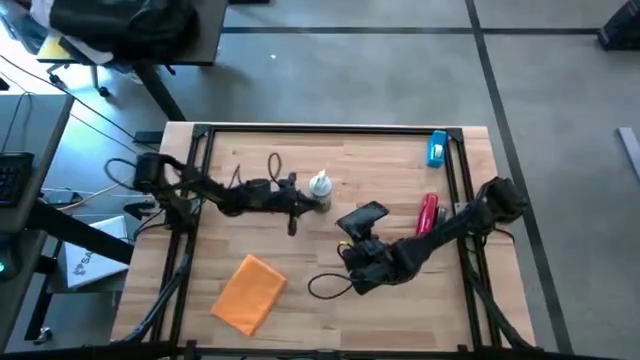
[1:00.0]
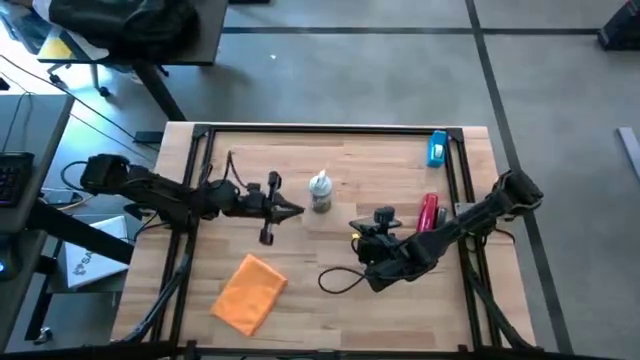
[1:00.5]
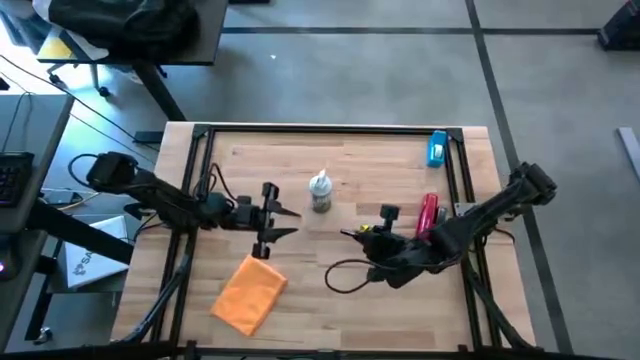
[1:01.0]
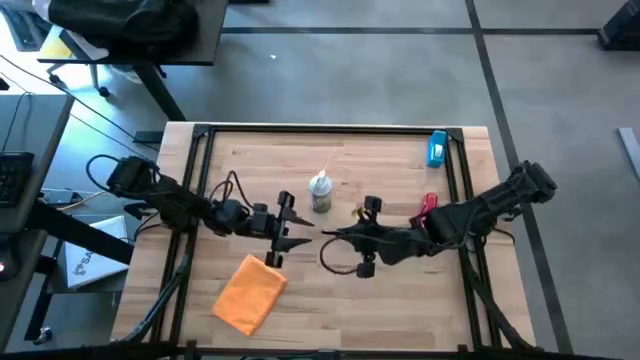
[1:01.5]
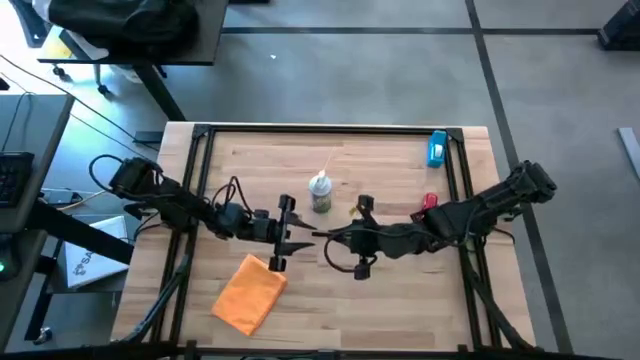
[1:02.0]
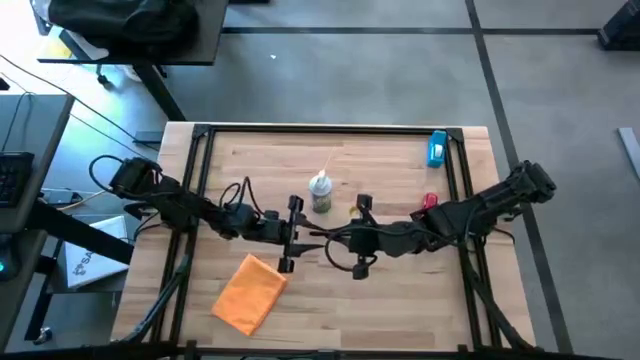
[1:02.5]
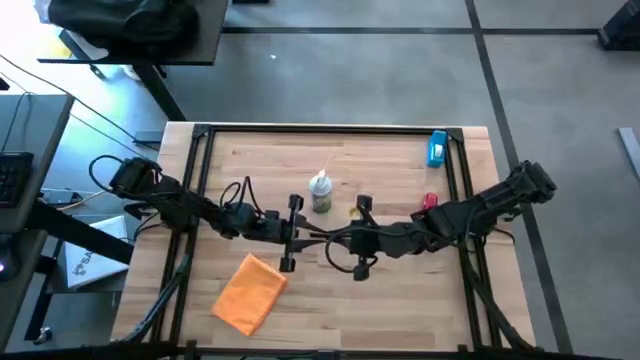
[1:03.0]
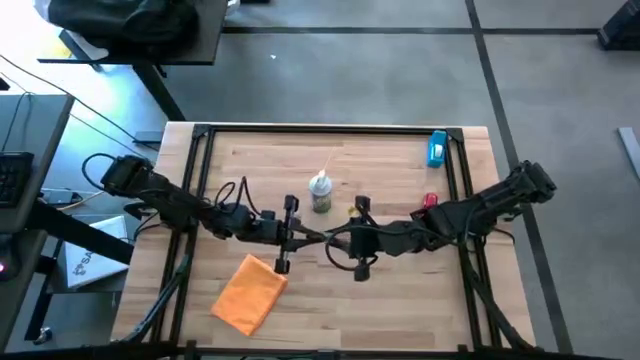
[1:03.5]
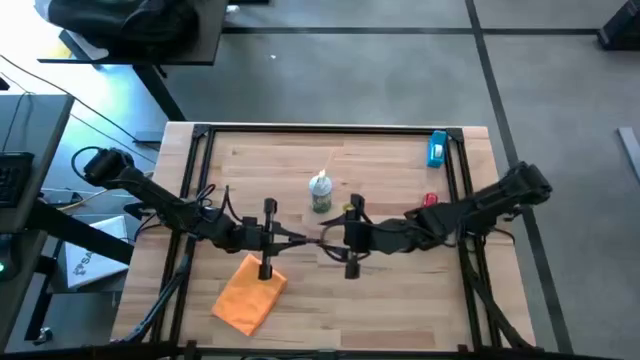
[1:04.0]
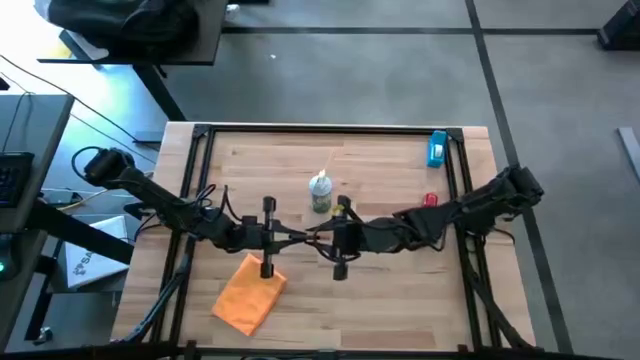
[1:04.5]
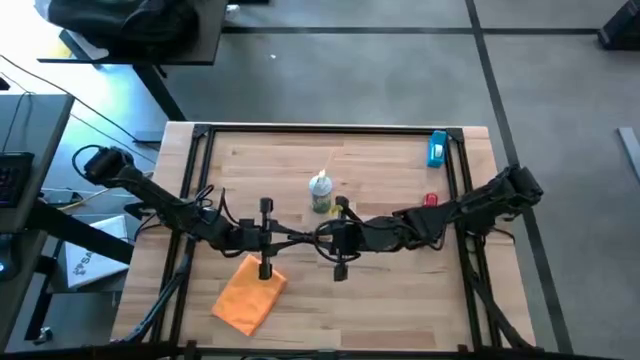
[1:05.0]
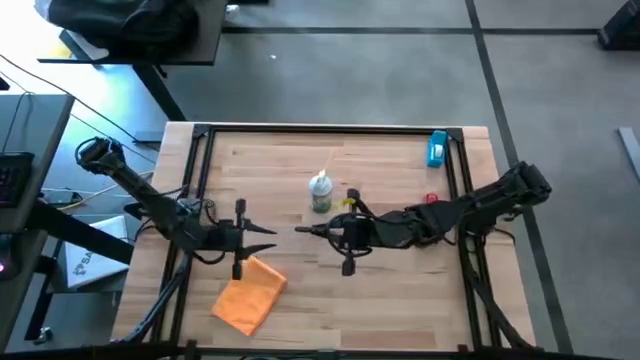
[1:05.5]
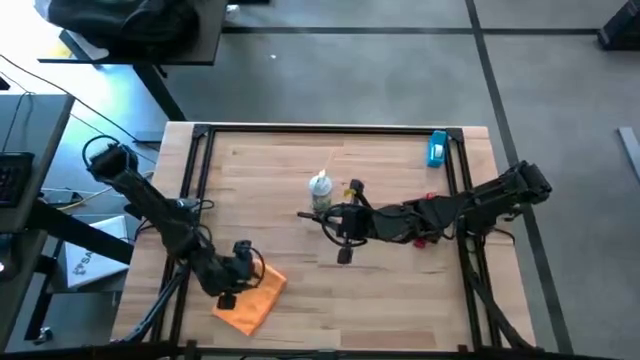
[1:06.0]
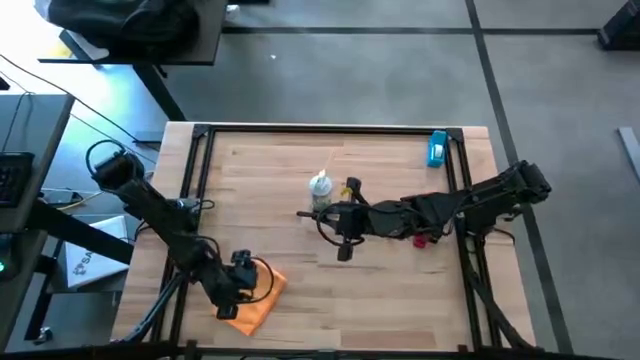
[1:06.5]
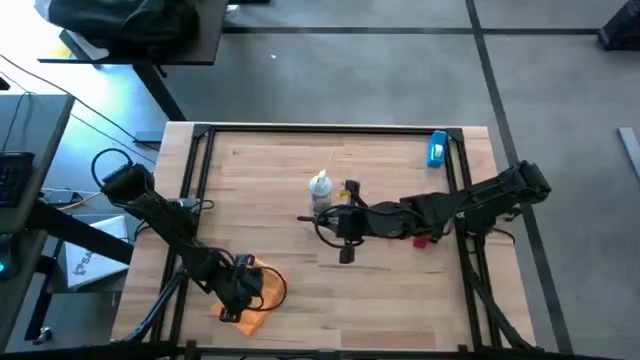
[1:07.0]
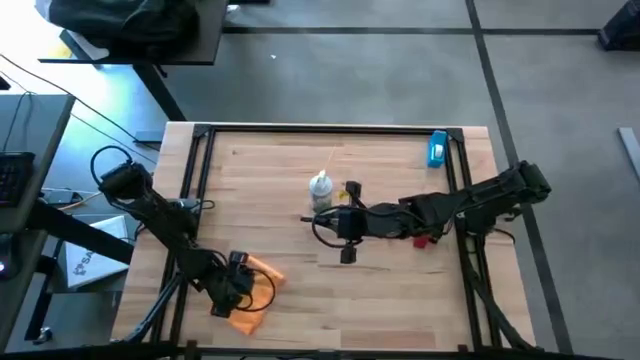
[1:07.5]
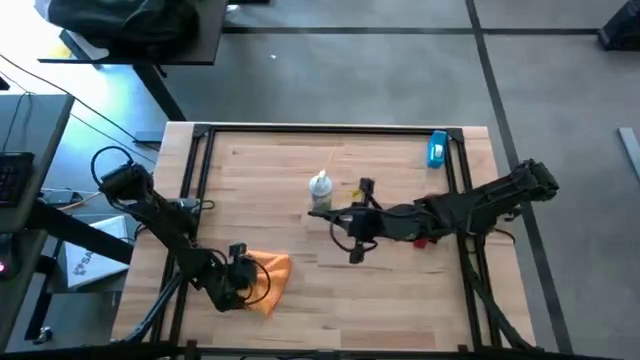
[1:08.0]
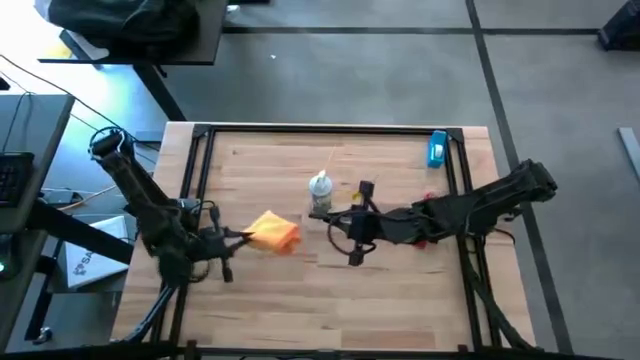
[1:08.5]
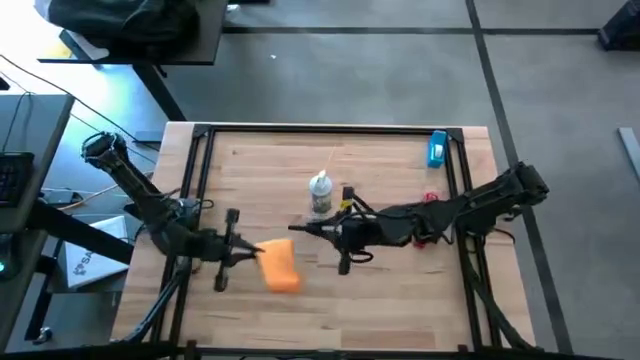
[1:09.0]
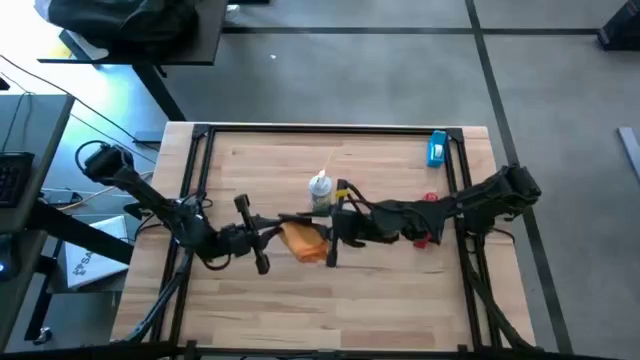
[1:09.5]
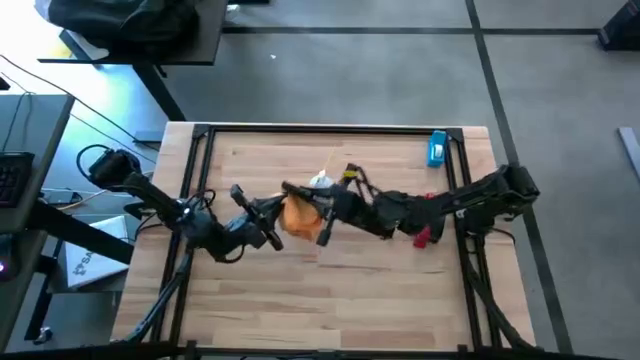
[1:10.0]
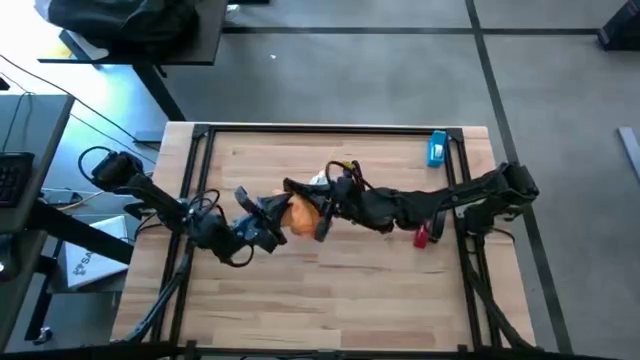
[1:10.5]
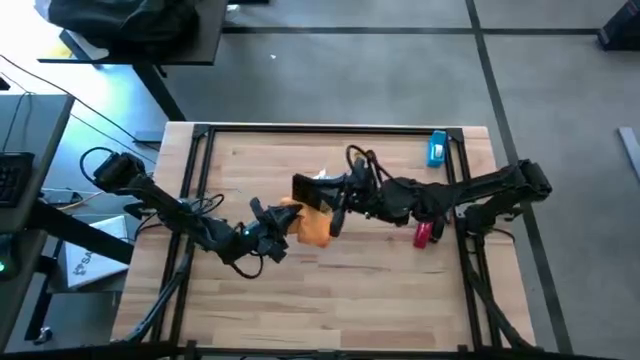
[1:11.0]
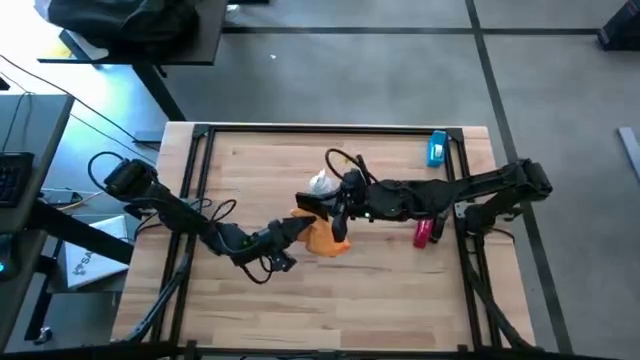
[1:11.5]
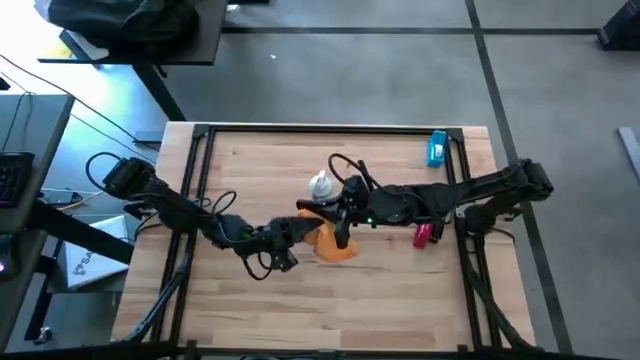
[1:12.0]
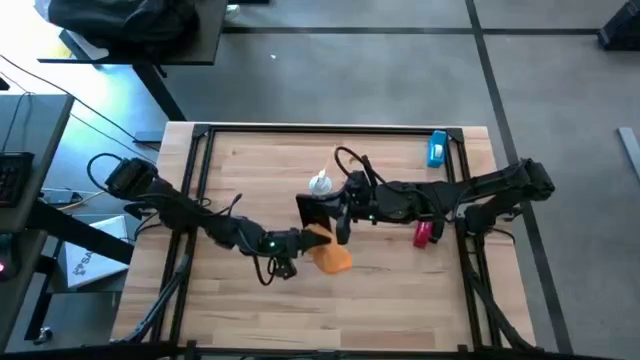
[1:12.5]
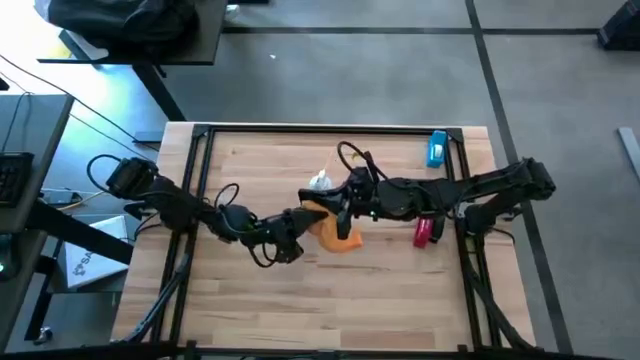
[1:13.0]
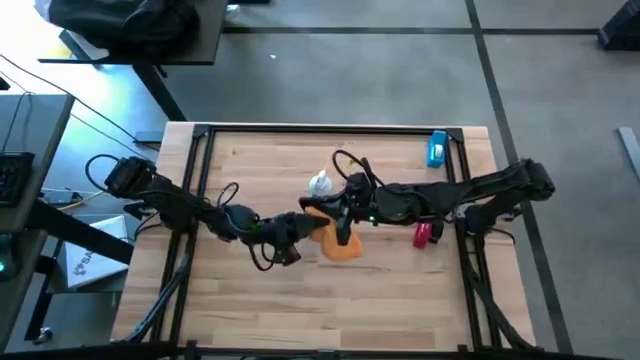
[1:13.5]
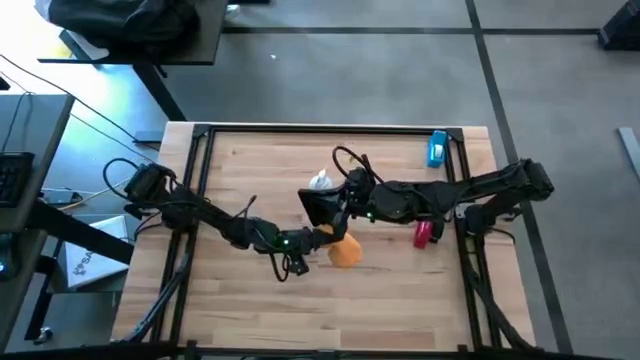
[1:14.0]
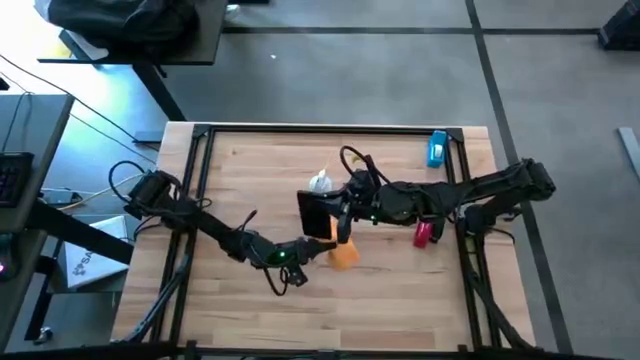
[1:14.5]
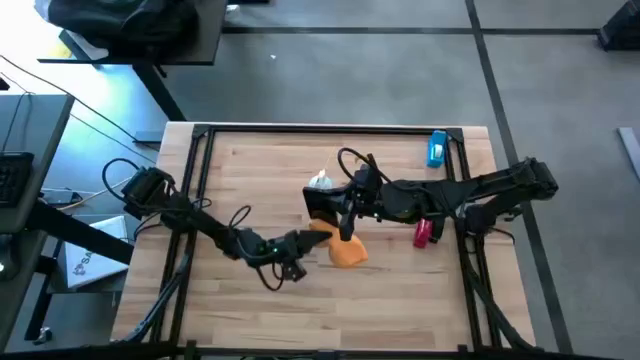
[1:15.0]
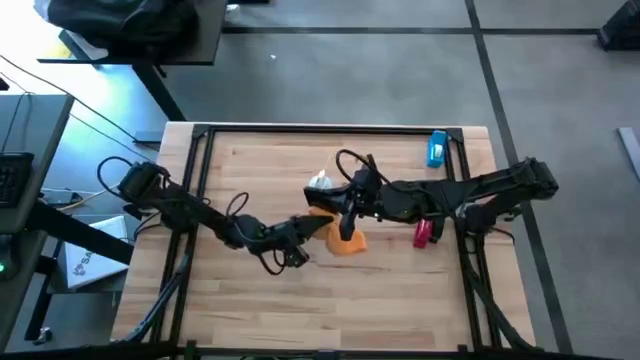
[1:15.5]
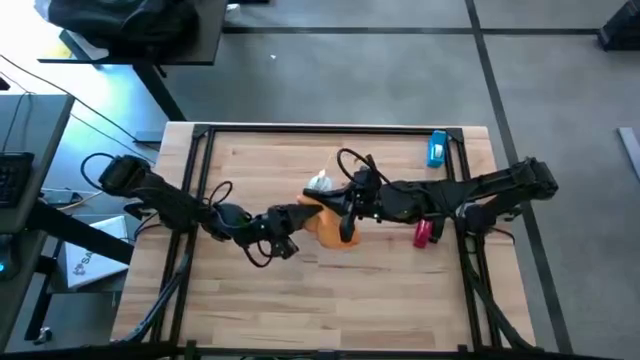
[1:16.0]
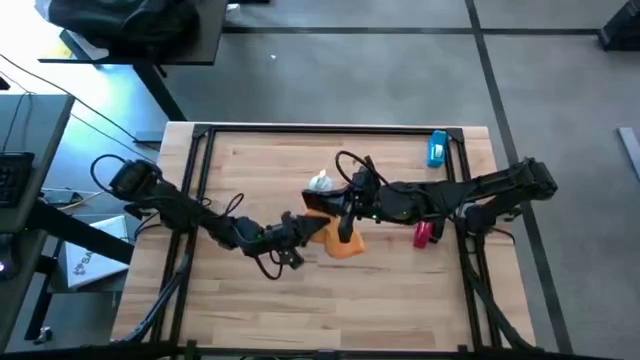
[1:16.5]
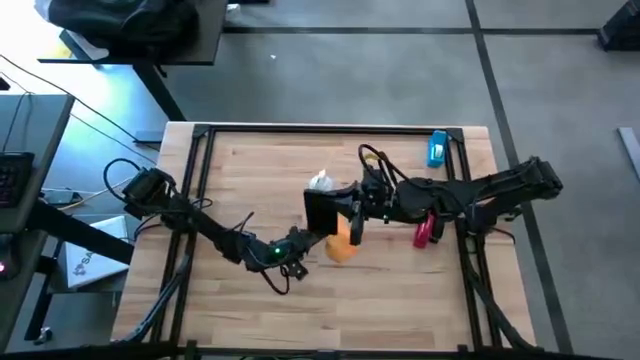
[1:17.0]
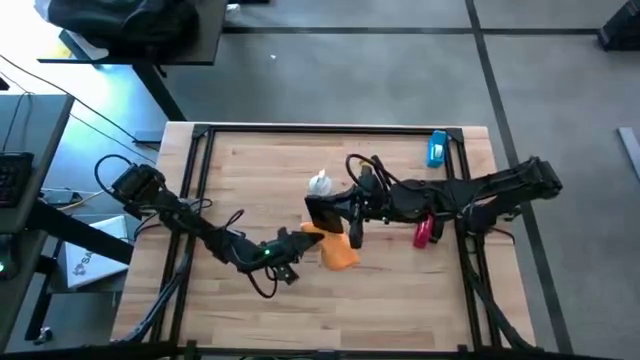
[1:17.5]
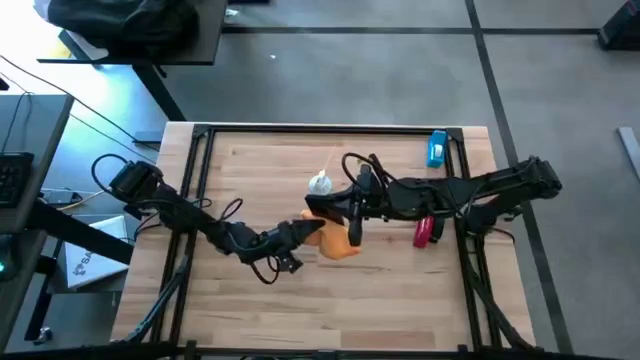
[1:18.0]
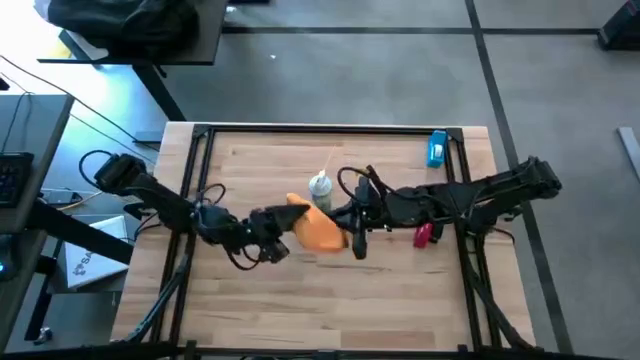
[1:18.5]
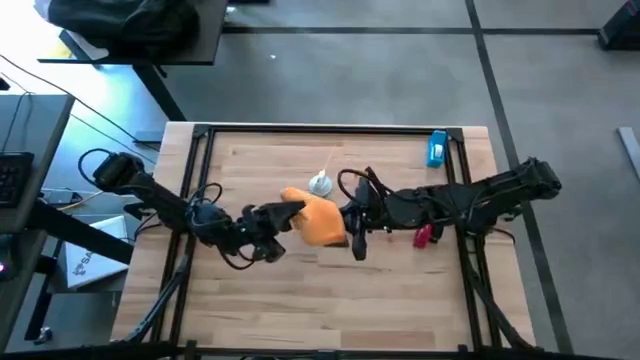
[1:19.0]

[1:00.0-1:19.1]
Task: Apply microfiber cloth
Wipe the black cellphone using the green microfiber cloth
